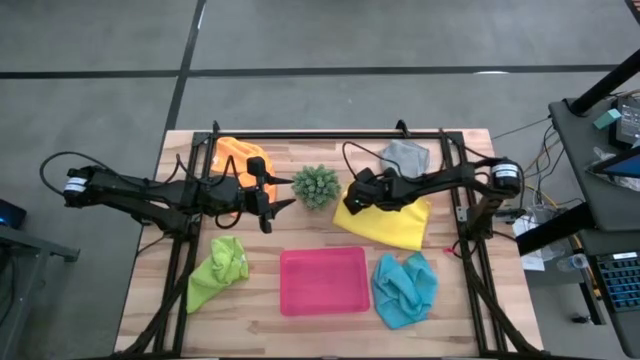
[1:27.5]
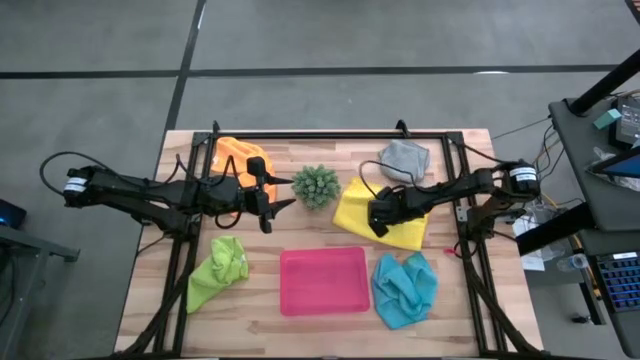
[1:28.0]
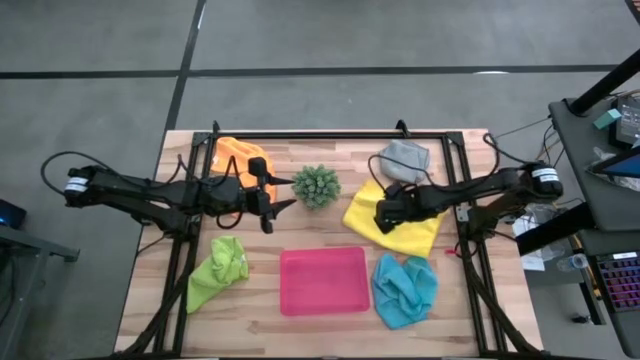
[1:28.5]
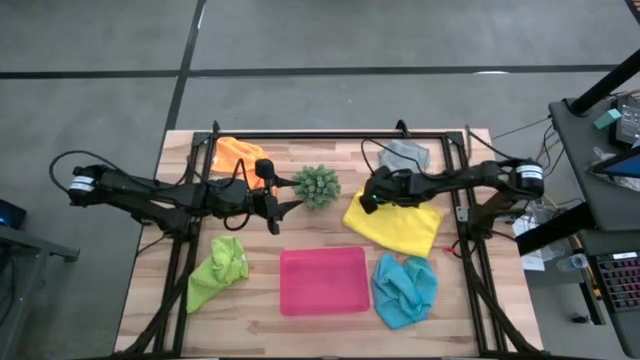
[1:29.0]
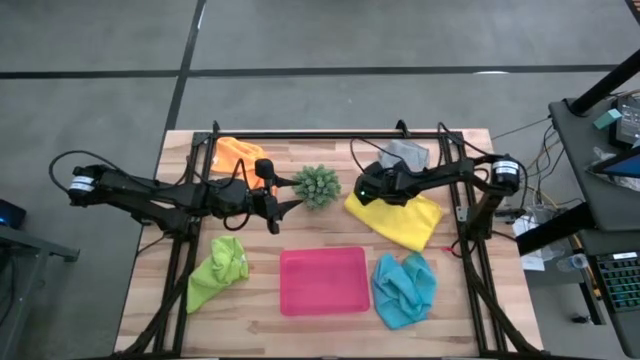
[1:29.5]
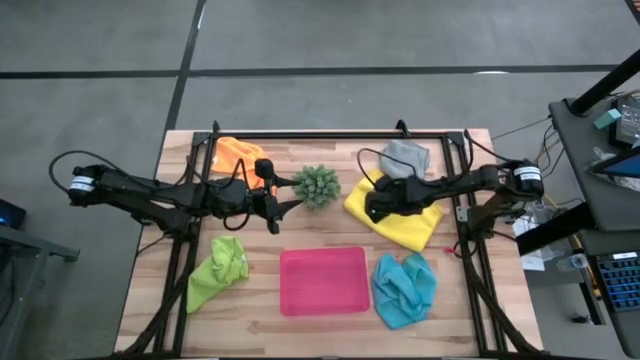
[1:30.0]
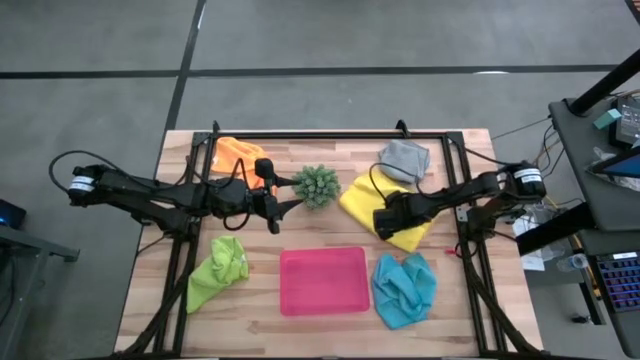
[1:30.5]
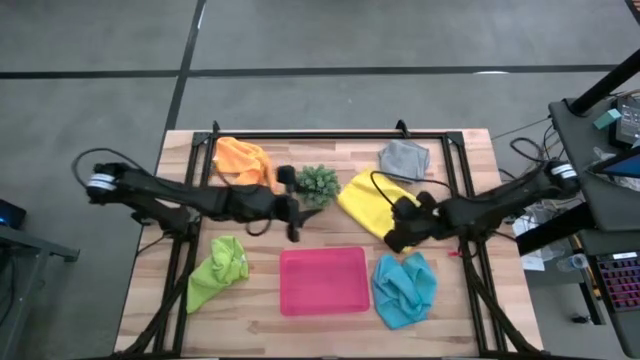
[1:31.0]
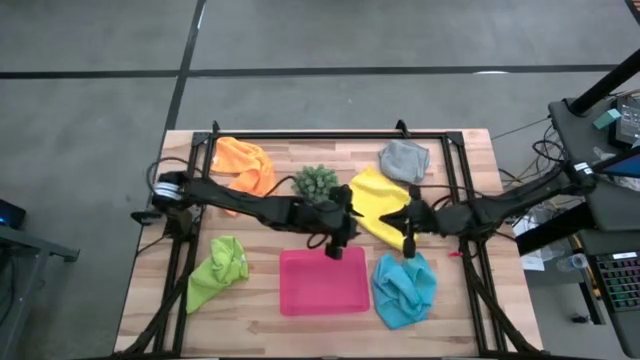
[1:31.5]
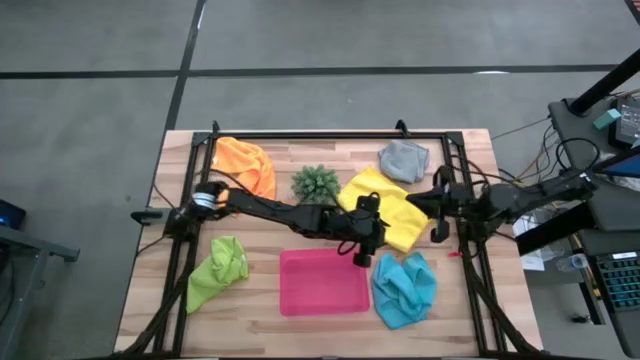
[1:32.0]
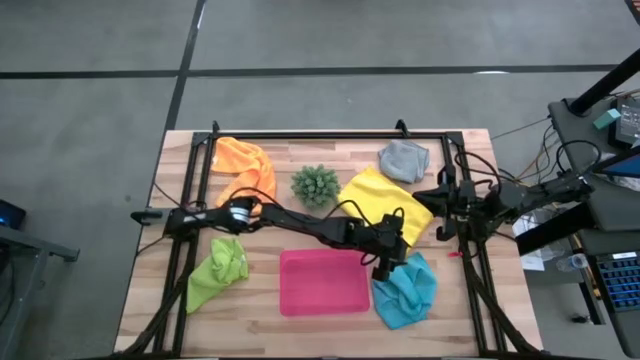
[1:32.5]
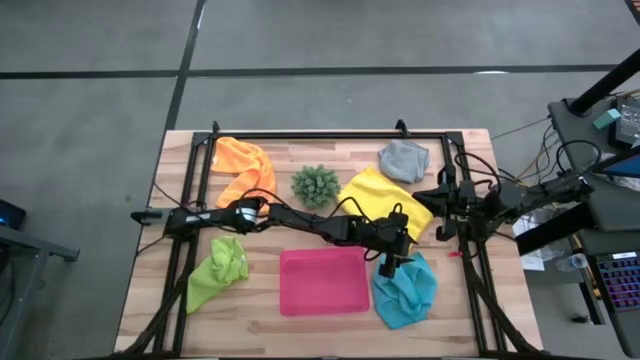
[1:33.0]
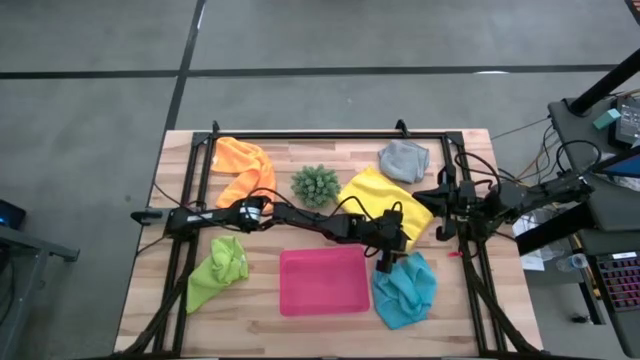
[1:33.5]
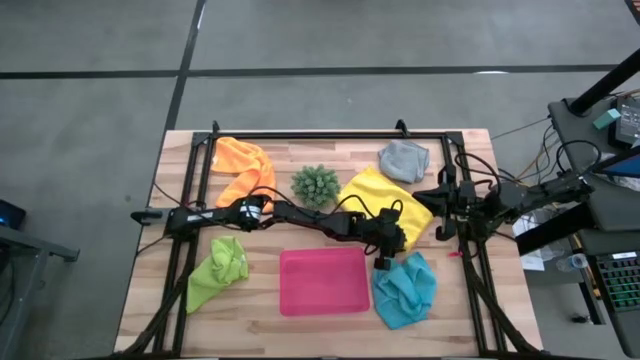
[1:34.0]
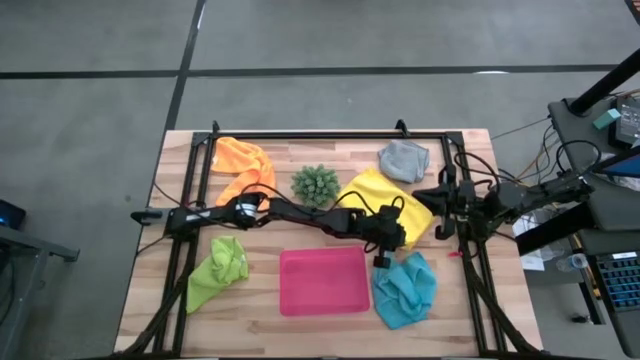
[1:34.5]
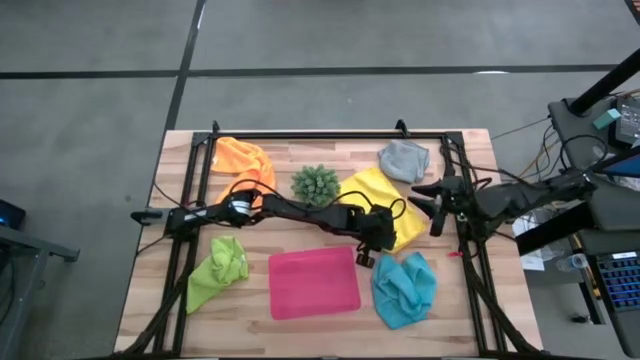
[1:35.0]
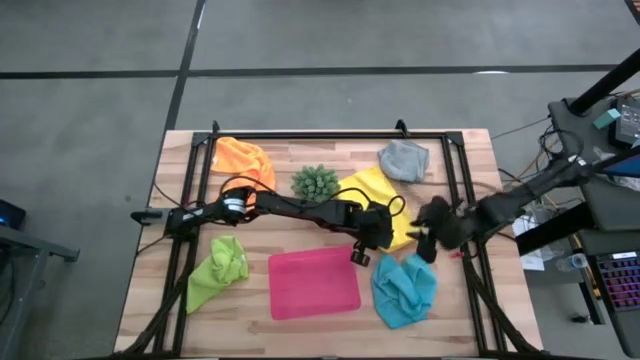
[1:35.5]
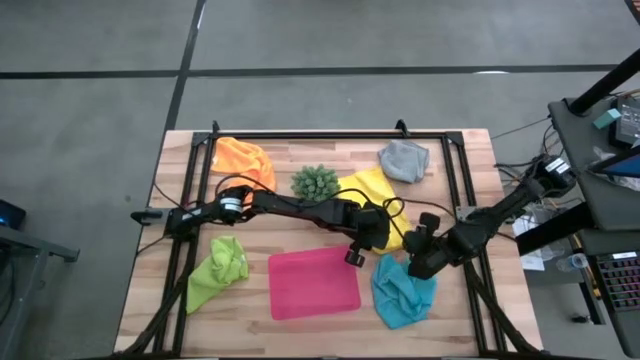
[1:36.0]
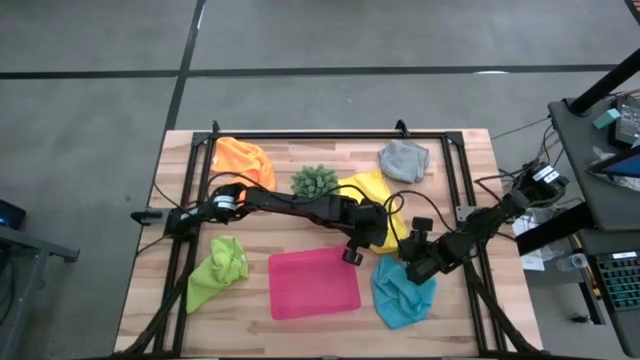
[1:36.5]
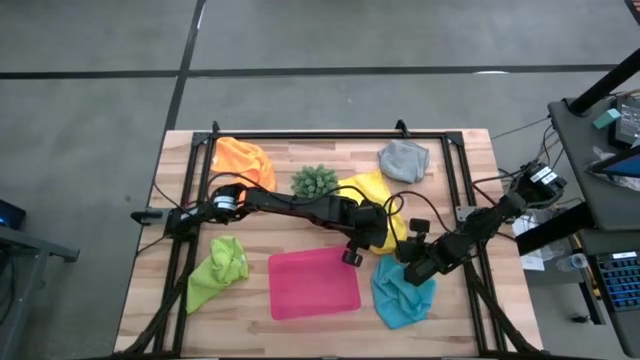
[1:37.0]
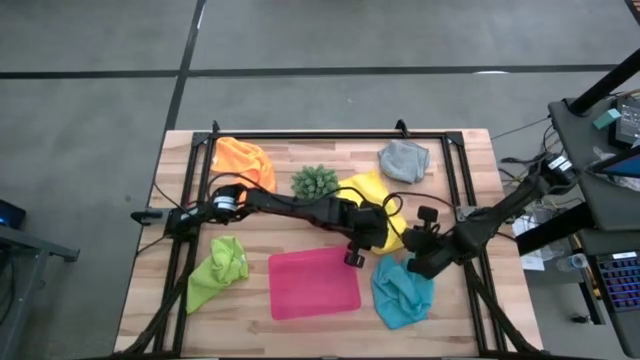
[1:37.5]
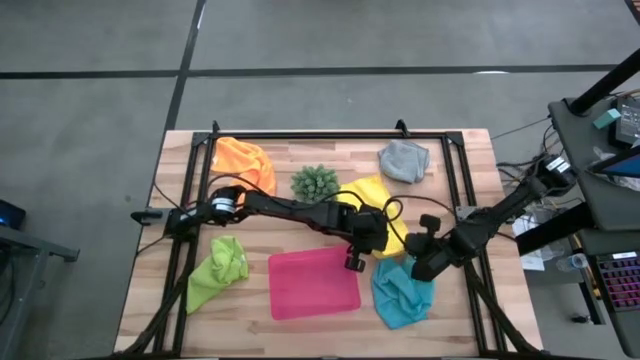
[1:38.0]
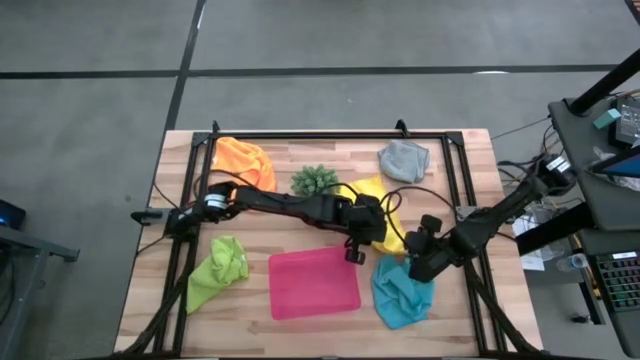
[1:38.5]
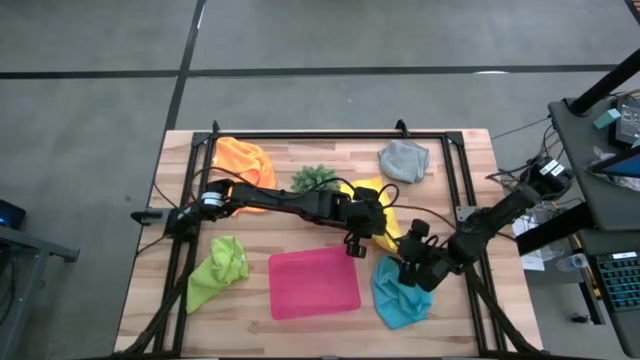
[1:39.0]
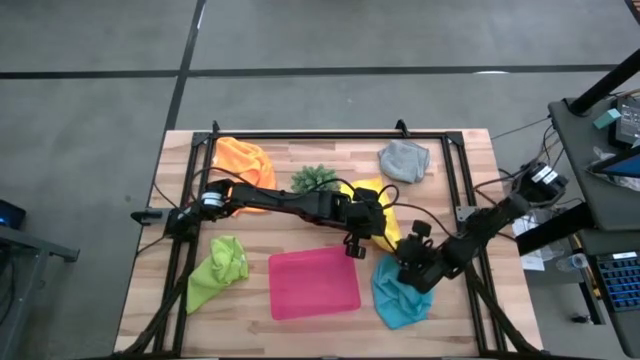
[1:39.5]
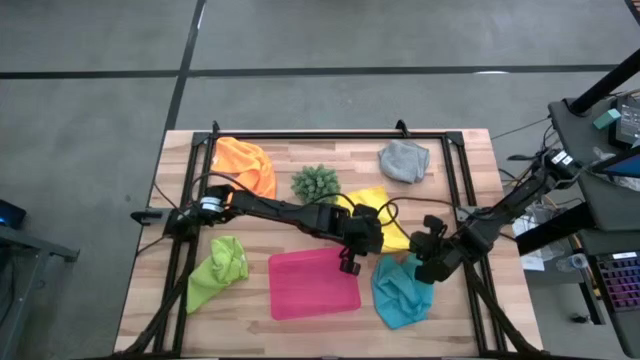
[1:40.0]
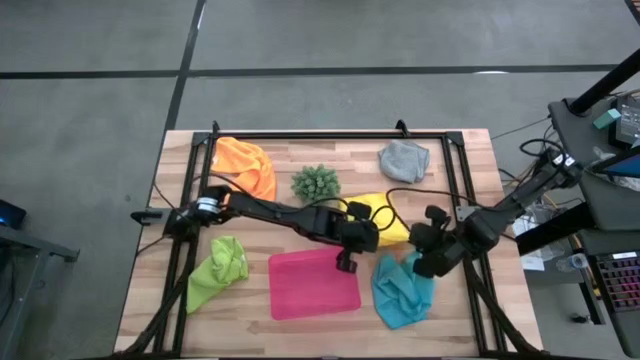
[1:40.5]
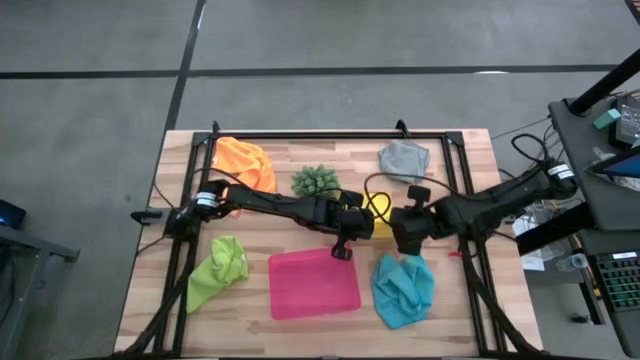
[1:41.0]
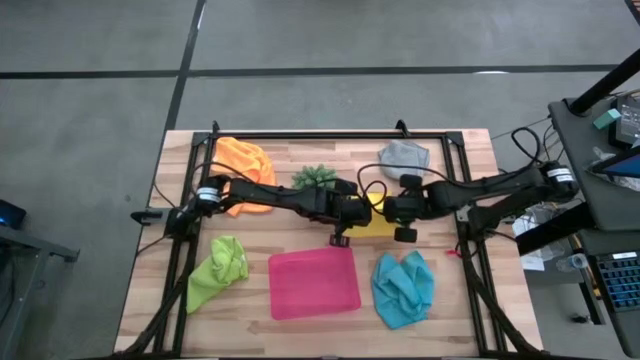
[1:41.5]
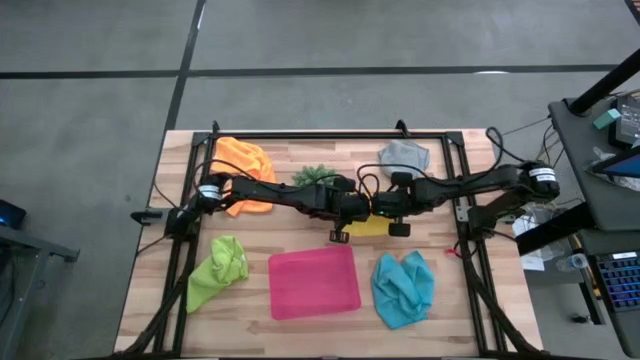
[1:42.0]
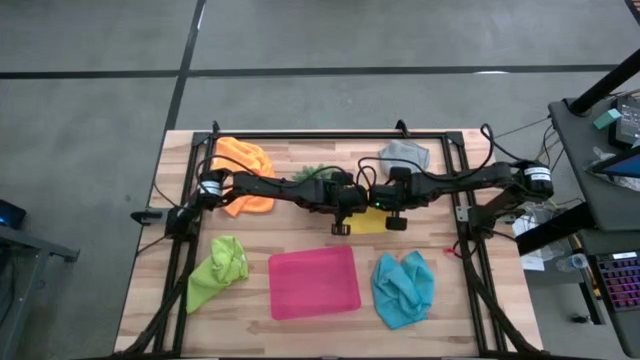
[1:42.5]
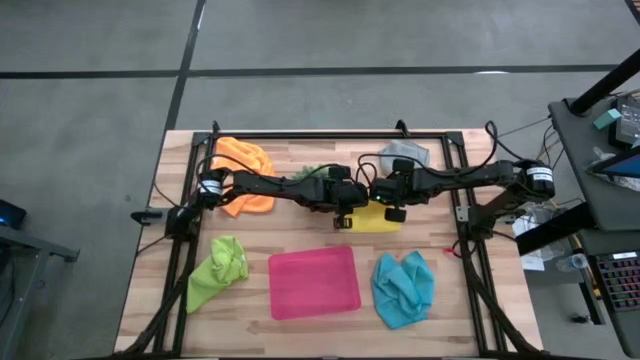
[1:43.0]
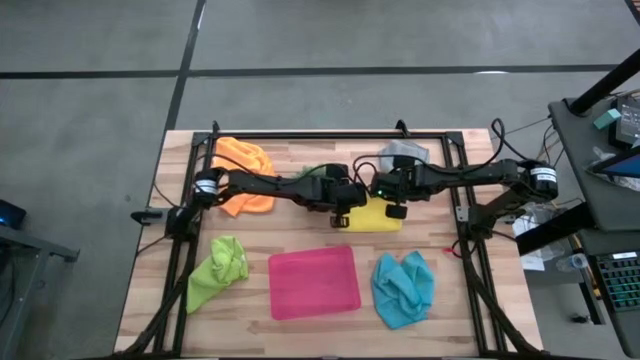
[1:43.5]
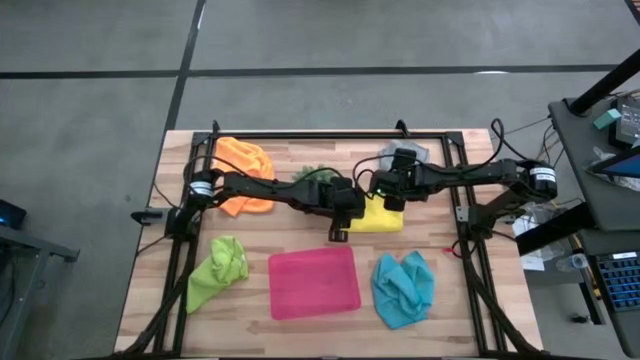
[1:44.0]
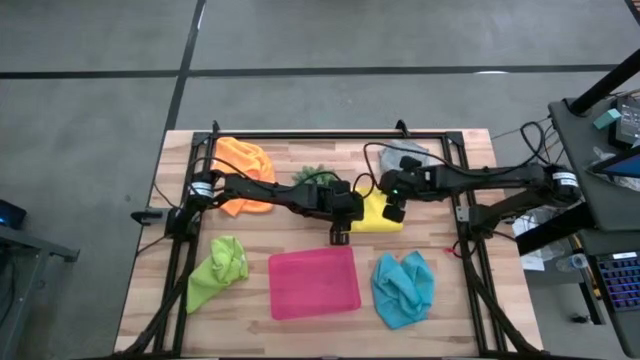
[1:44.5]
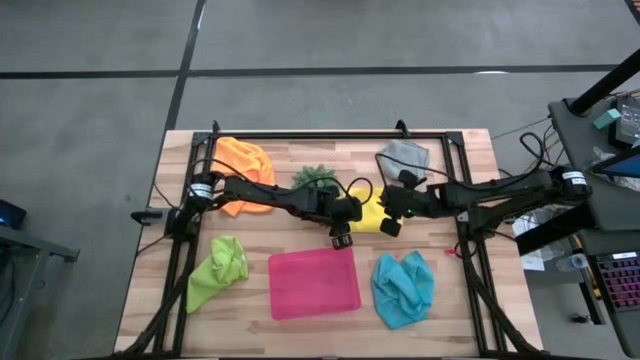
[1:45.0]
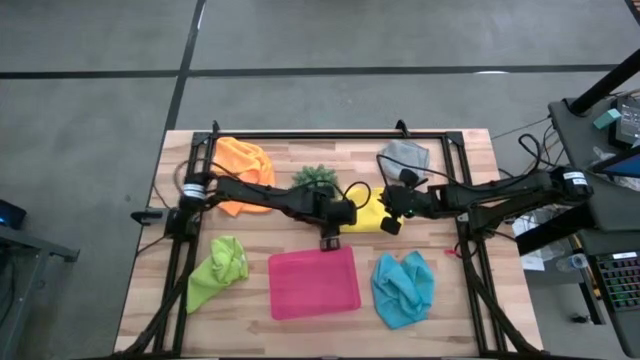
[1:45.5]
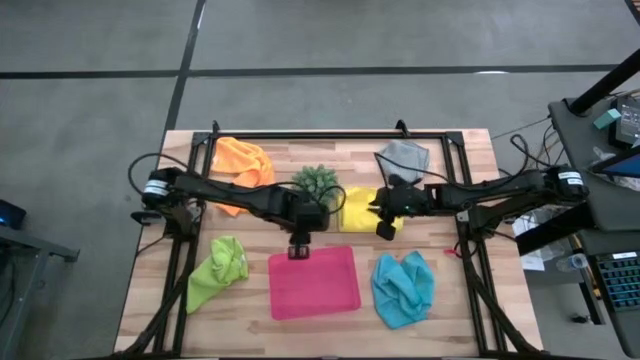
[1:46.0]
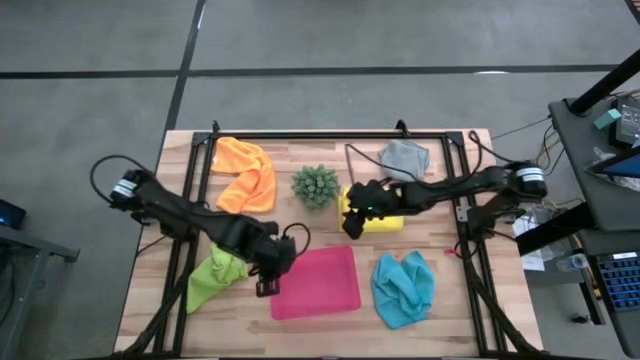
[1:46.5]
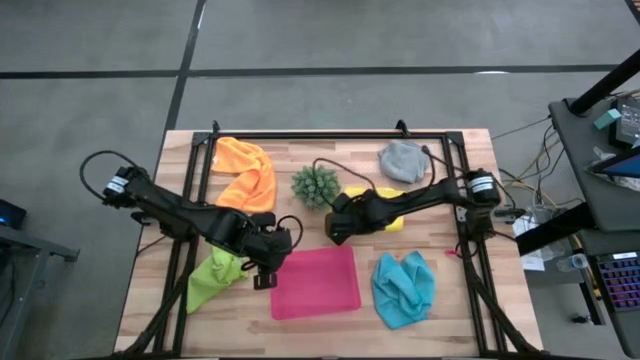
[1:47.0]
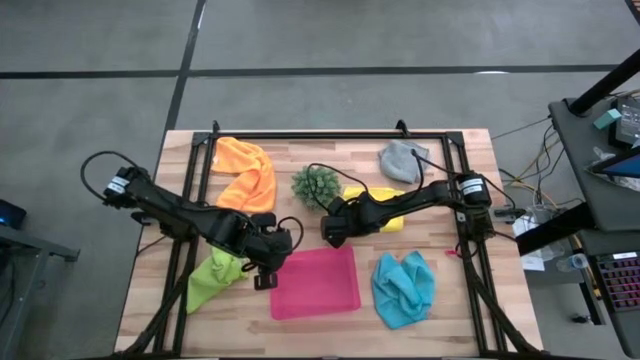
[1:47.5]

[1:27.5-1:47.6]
Task: Fold microfiber towels
Fold the yellow microfiber cloth
